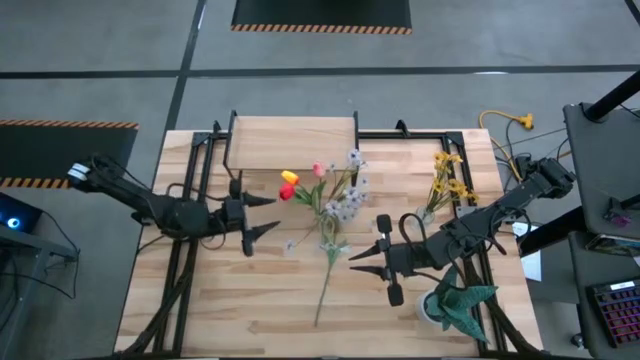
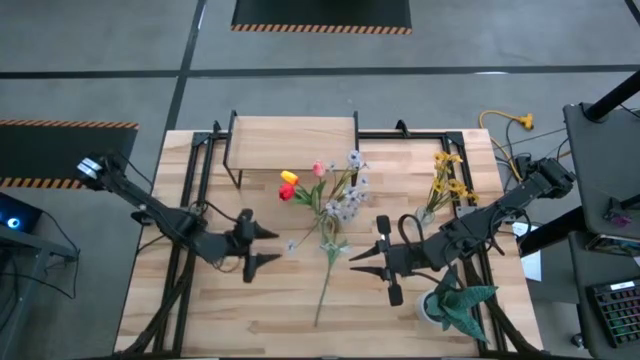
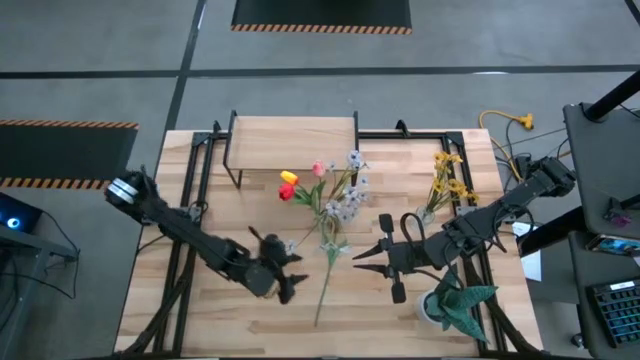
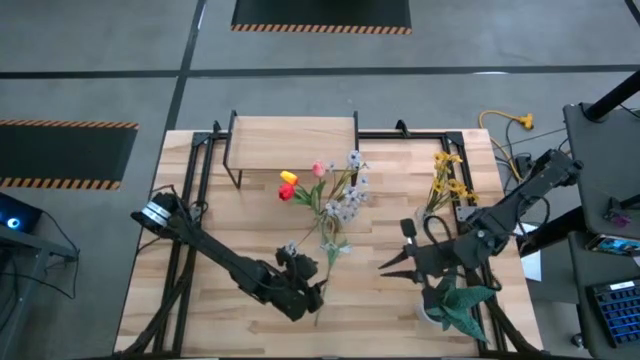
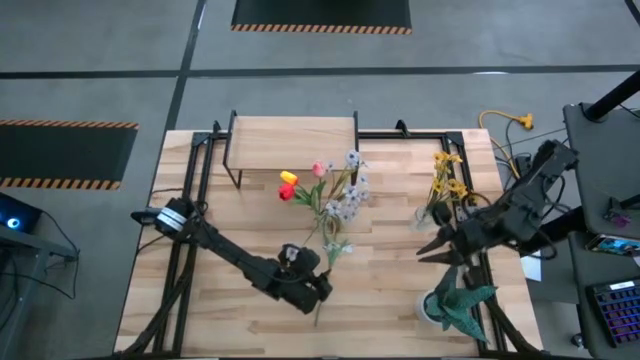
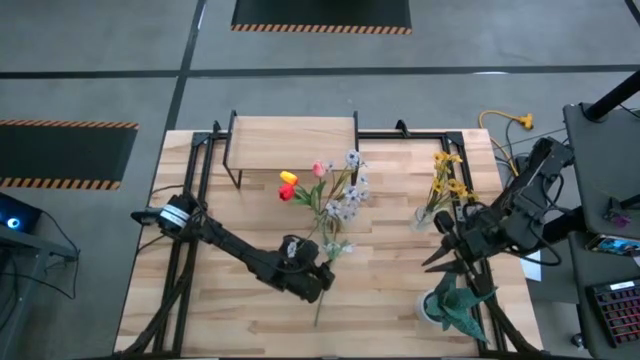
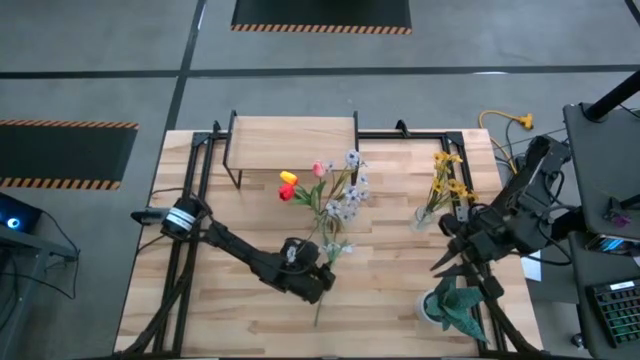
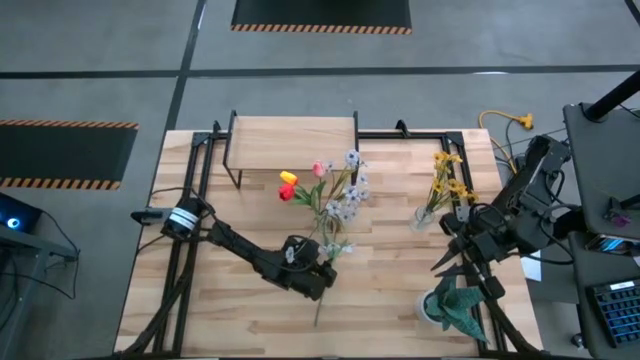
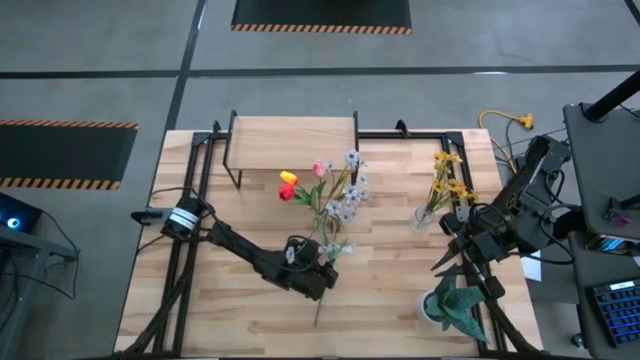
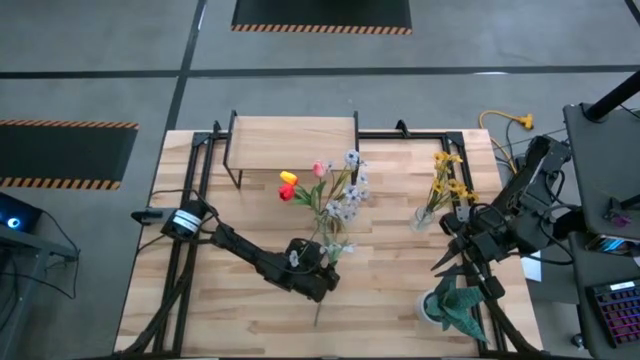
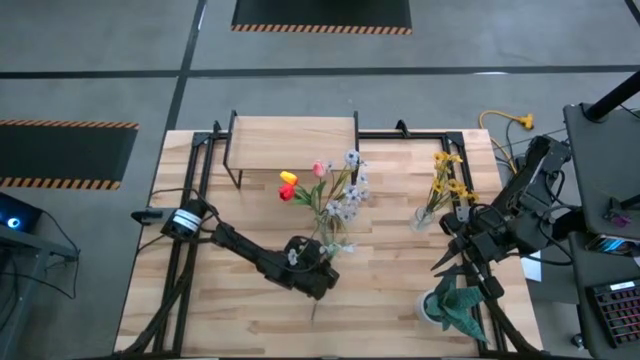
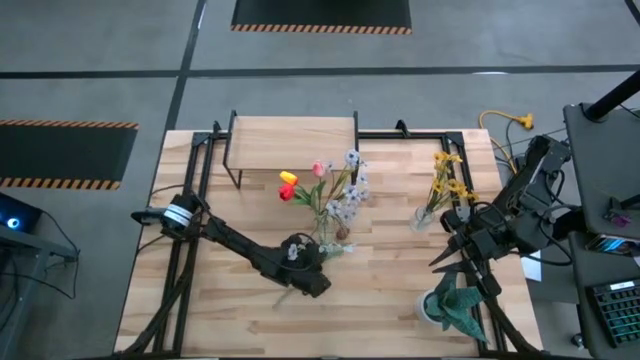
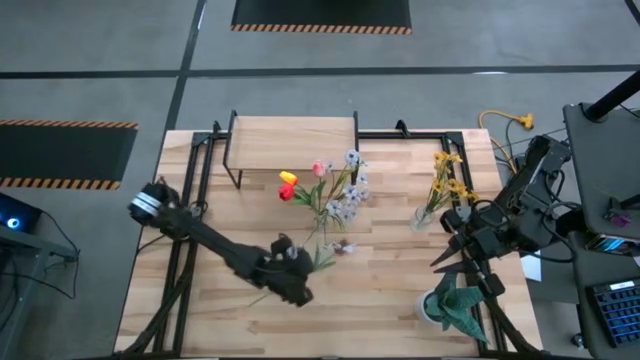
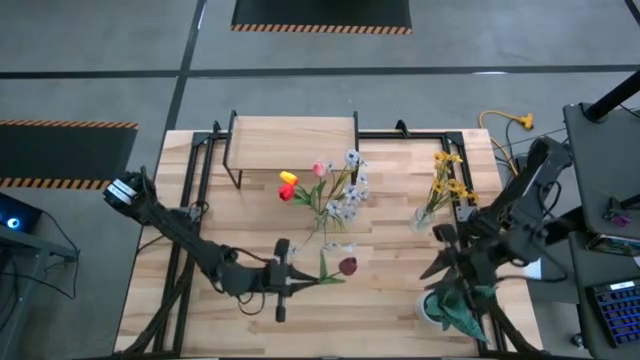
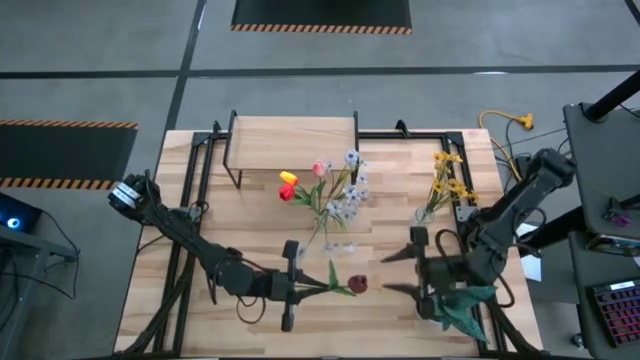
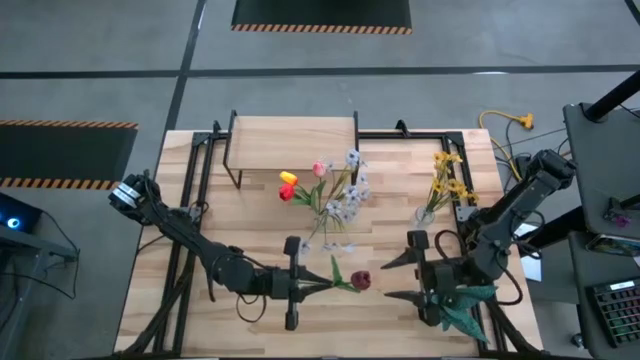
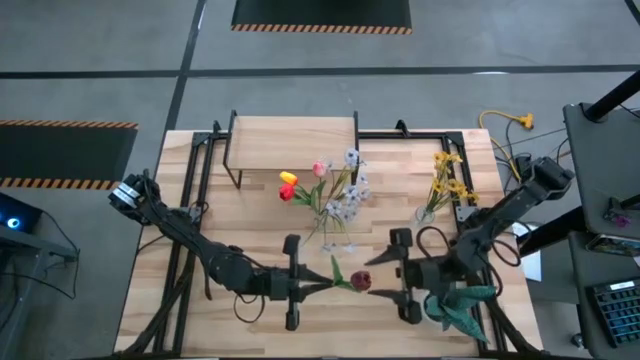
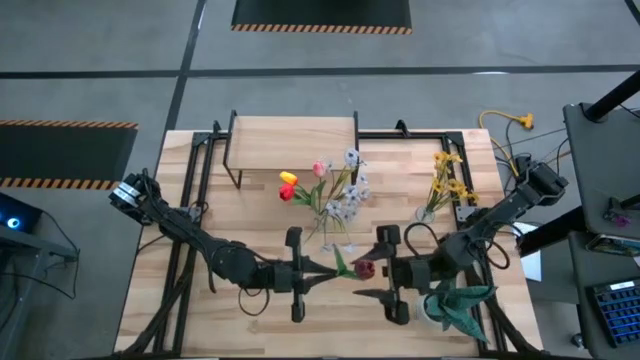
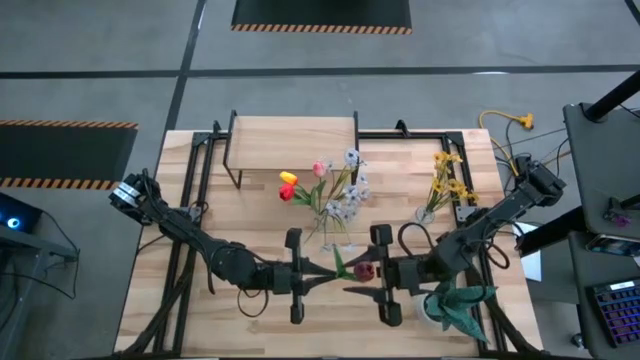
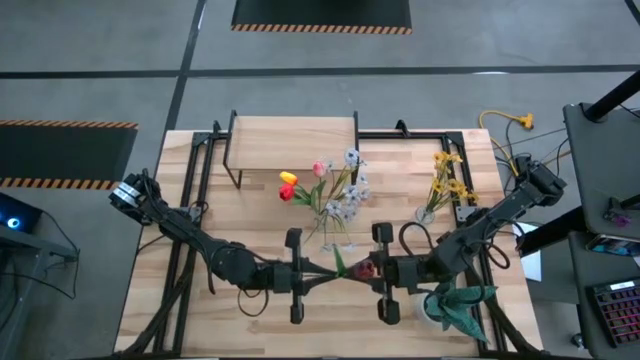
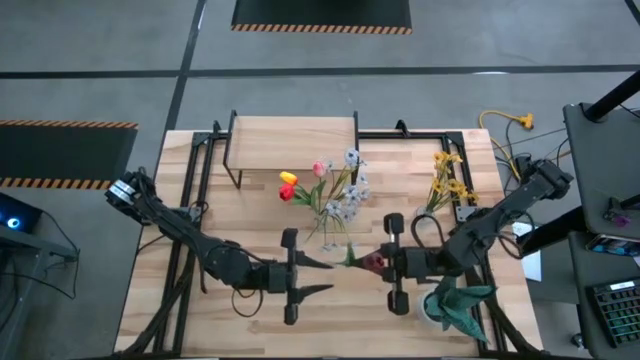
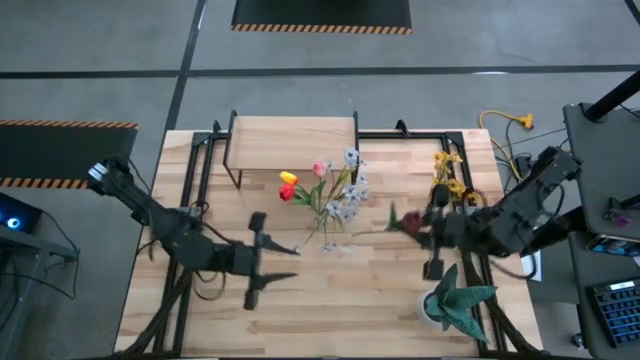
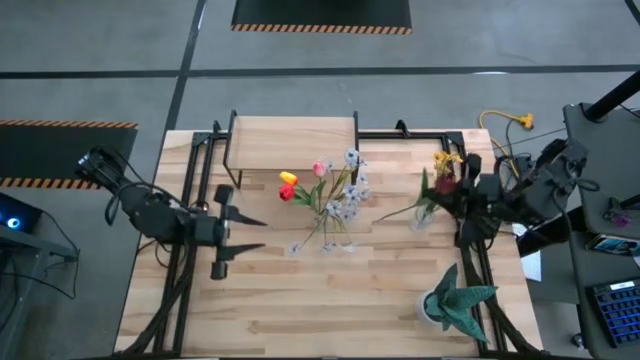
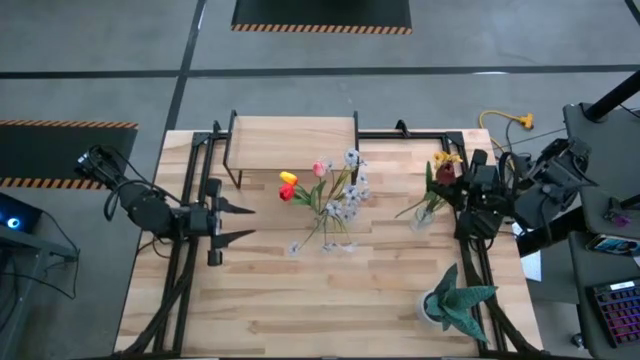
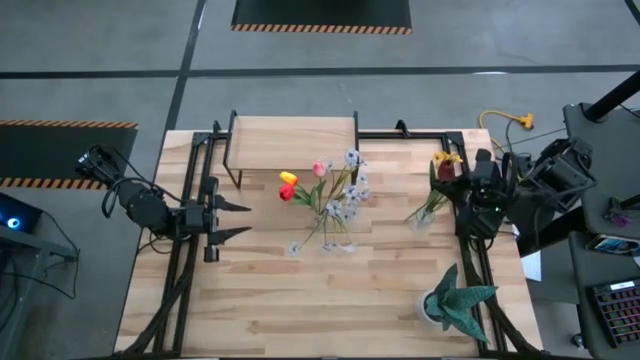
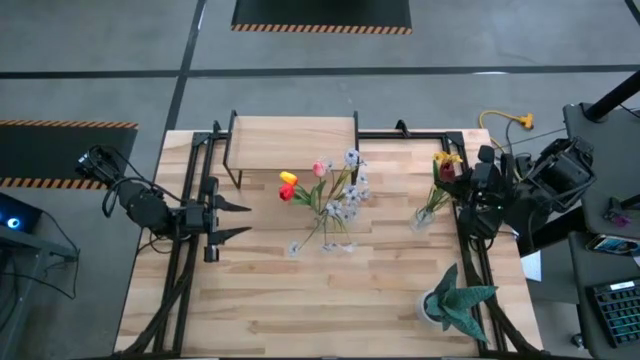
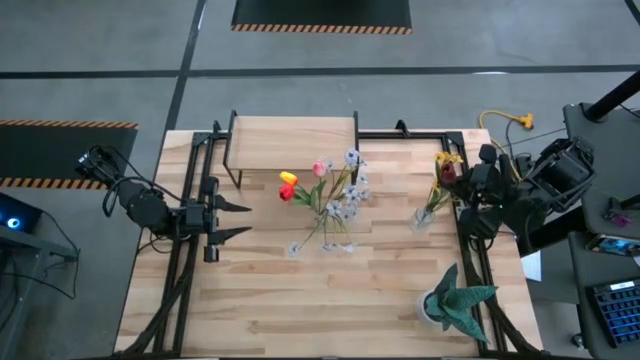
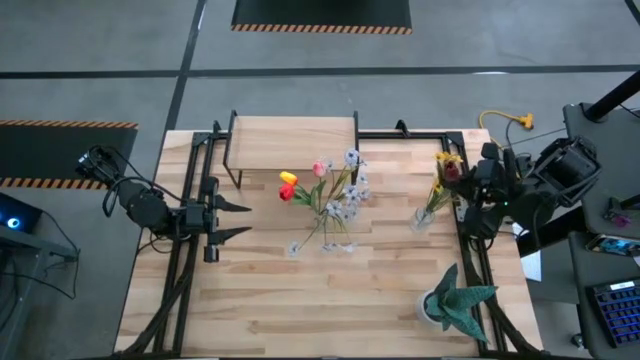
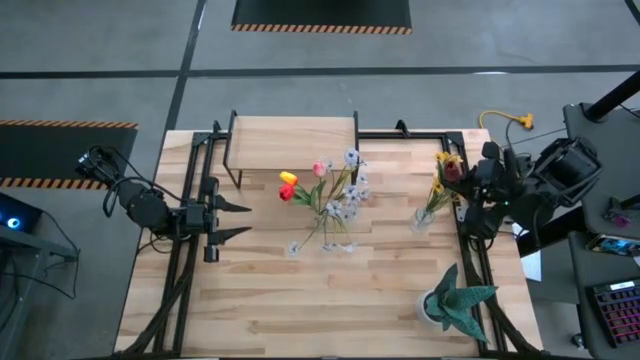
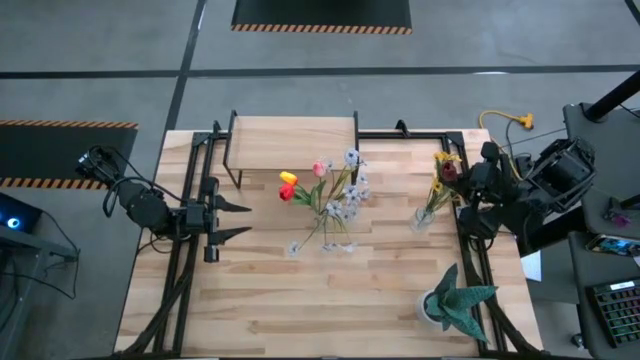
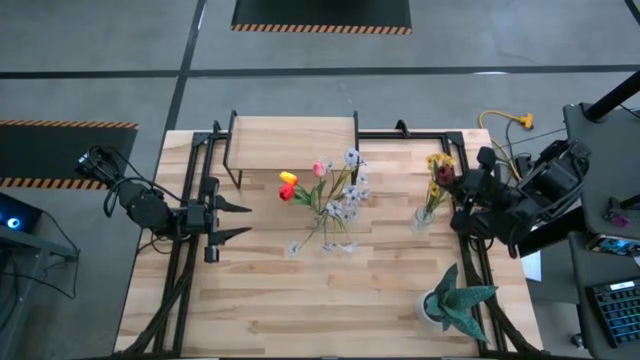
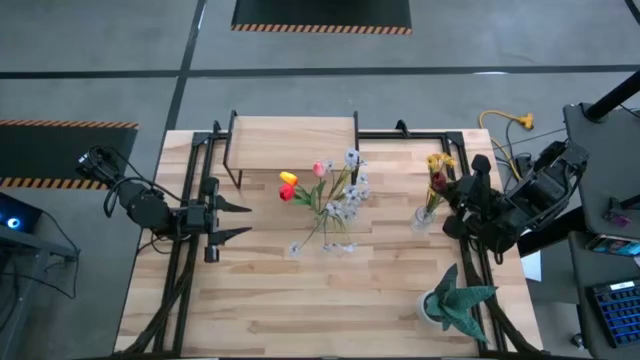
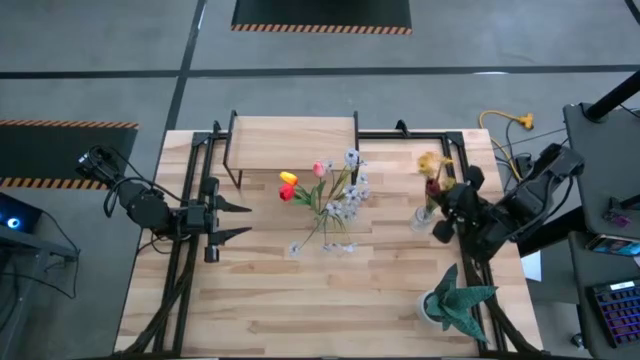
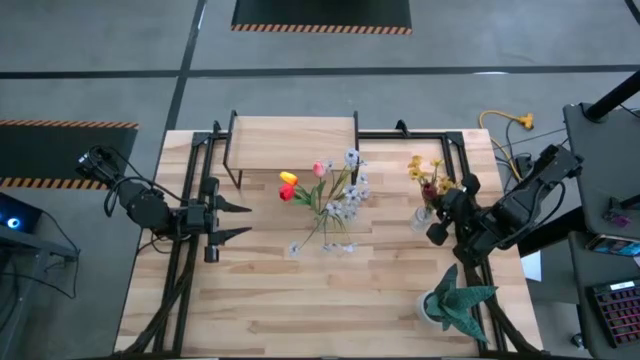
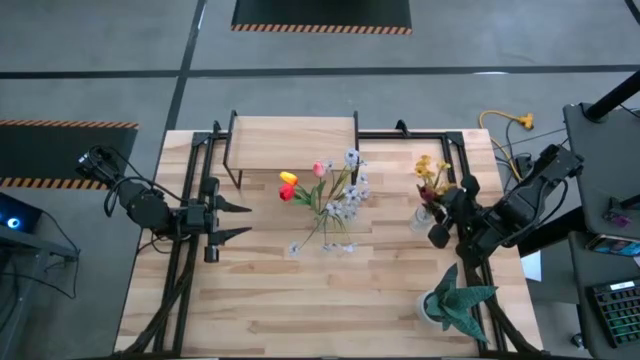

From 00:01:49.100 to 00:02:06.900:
Task: Pick and place flowers into a vace then onto a shelf
Put the dark red flower into the right transparent vase

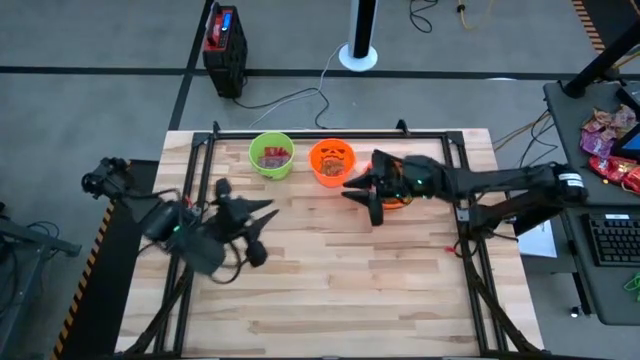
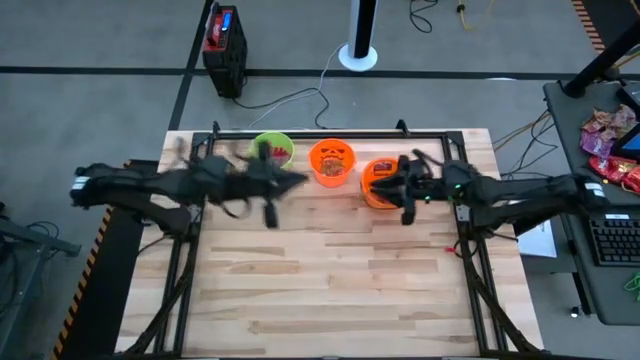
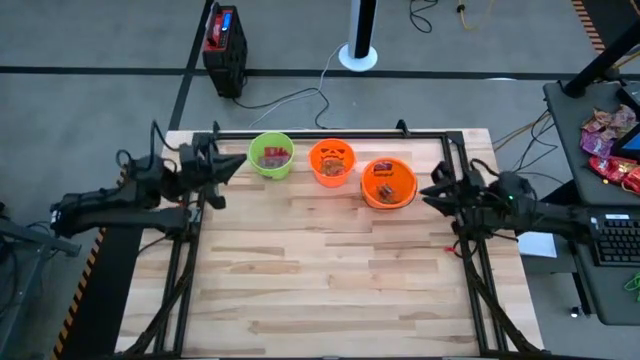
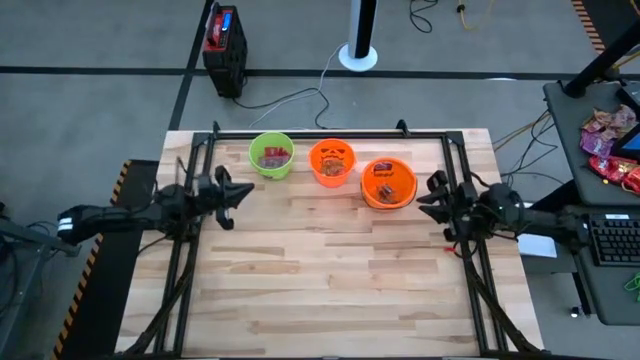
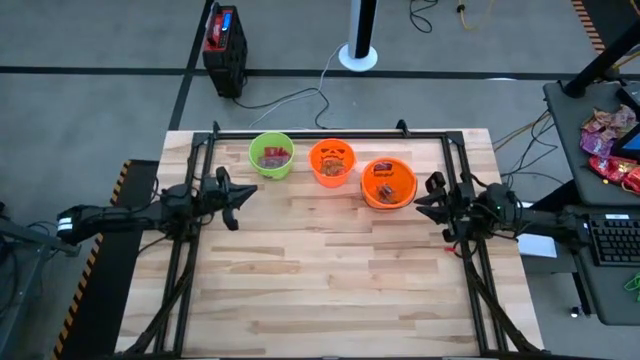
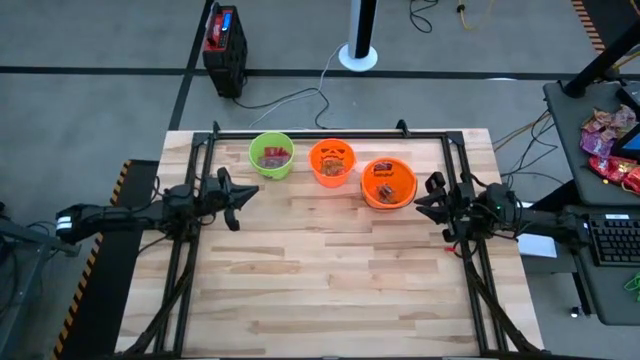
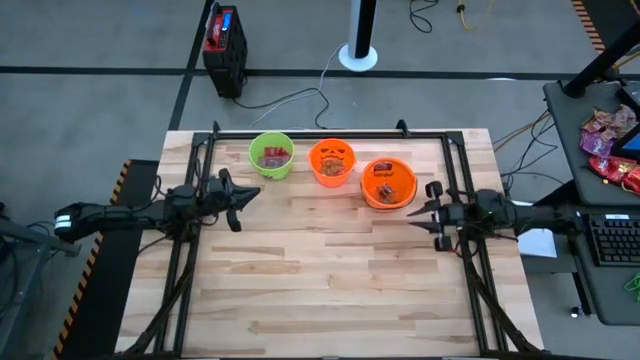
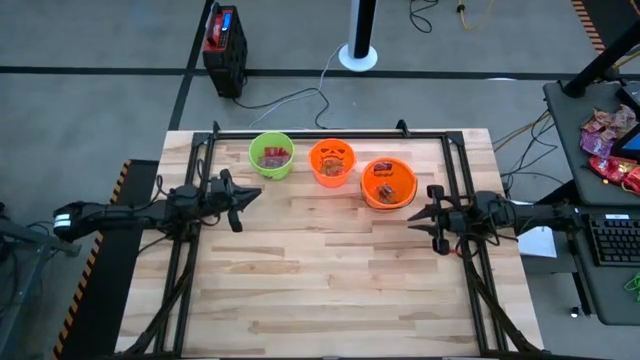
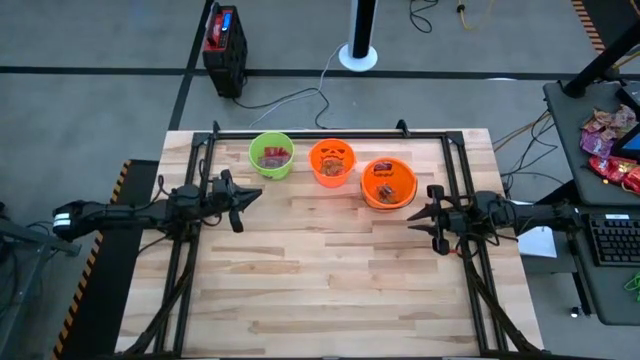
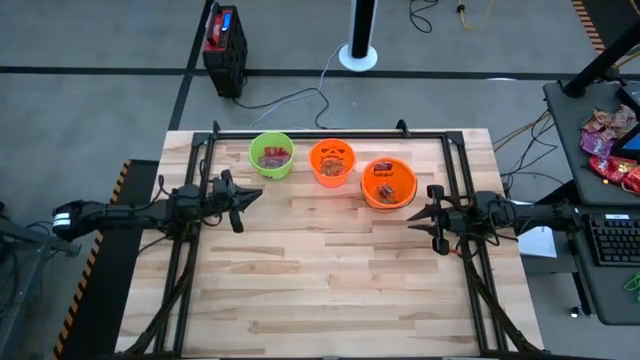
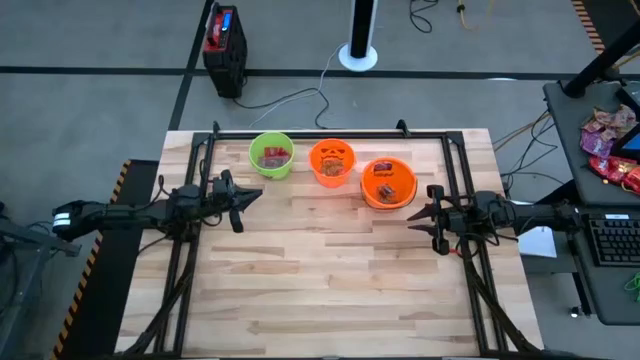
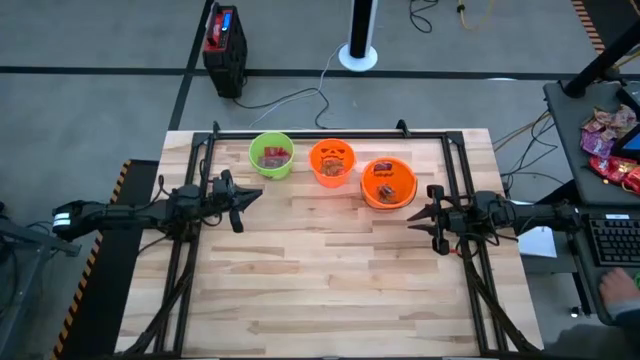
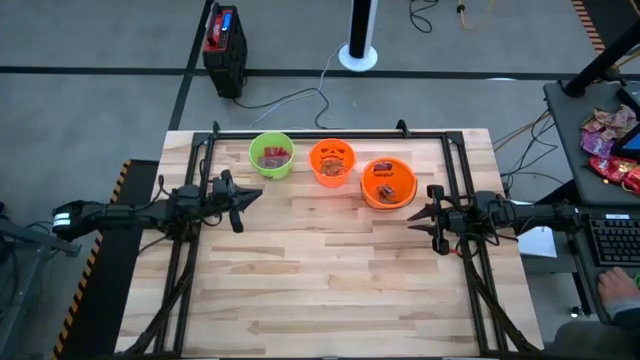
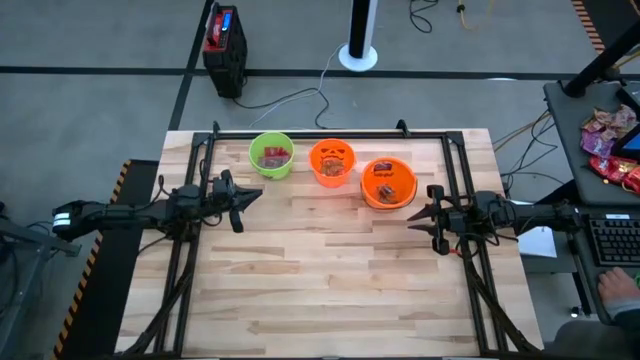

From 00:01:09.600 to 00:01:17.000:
Task: Sort candy by brand, put in halloween buckets
Return to Home Position
